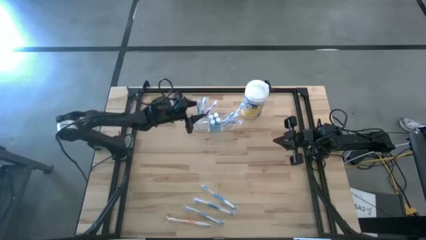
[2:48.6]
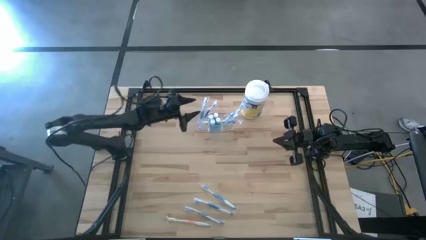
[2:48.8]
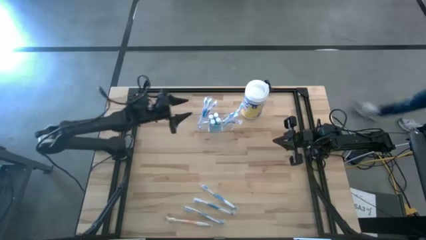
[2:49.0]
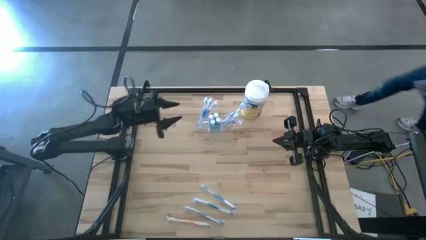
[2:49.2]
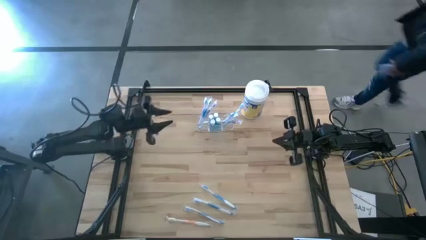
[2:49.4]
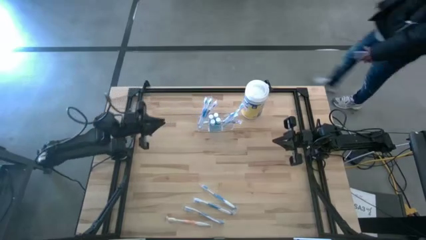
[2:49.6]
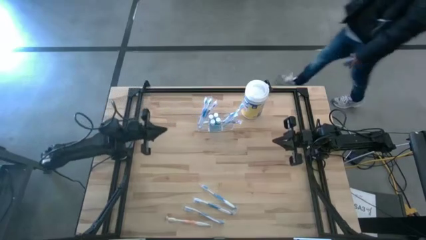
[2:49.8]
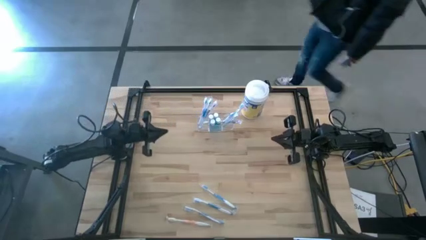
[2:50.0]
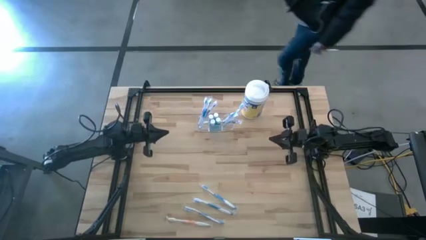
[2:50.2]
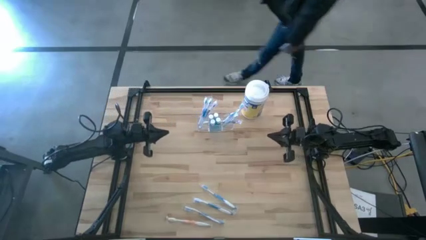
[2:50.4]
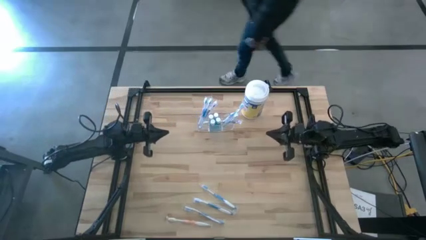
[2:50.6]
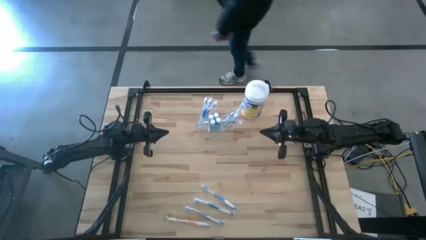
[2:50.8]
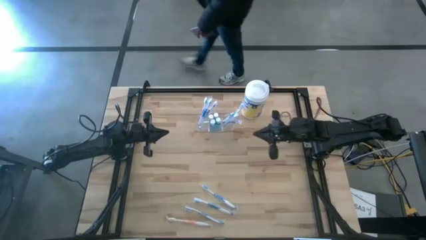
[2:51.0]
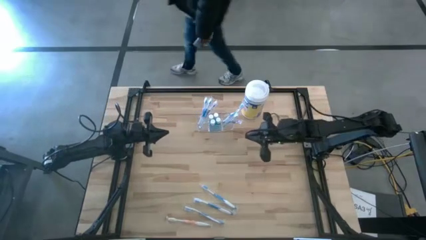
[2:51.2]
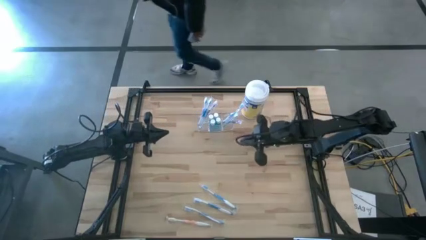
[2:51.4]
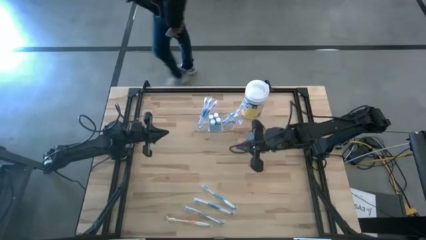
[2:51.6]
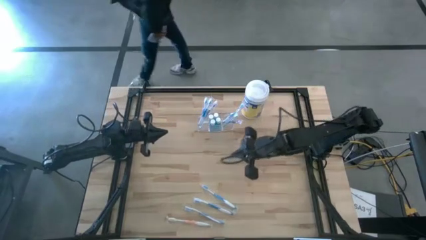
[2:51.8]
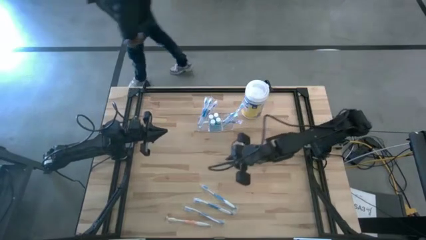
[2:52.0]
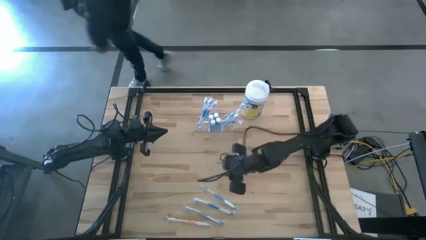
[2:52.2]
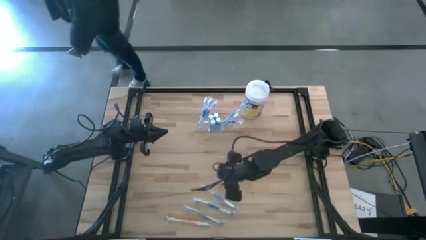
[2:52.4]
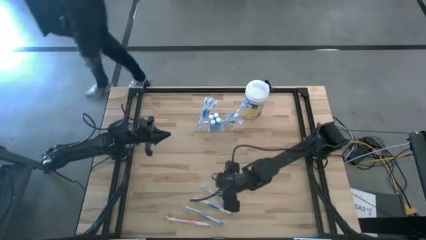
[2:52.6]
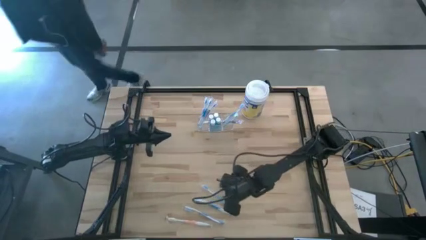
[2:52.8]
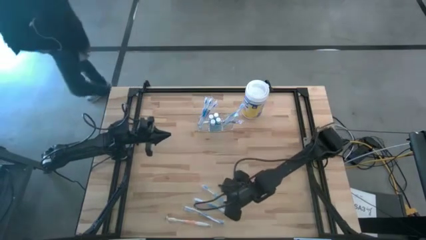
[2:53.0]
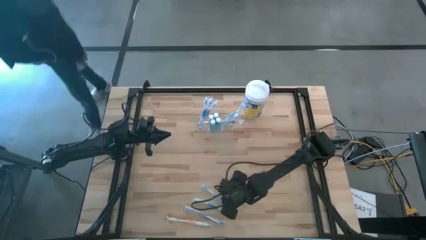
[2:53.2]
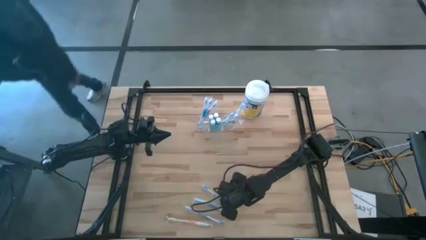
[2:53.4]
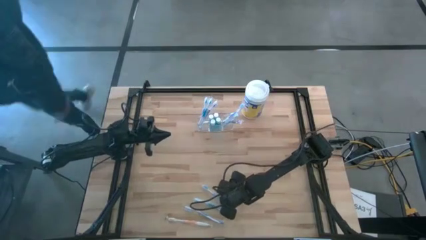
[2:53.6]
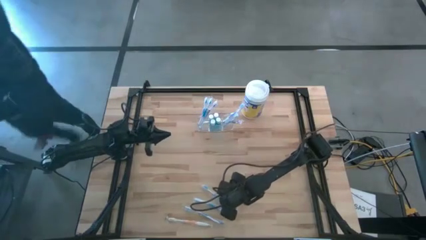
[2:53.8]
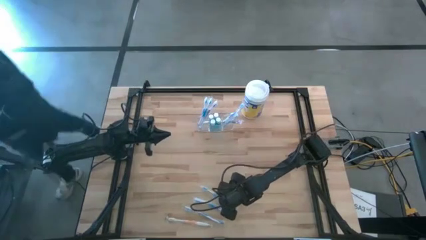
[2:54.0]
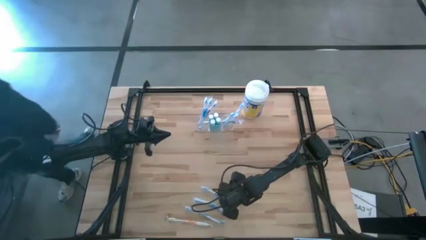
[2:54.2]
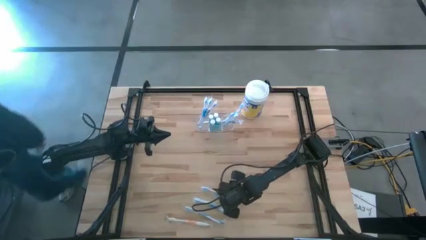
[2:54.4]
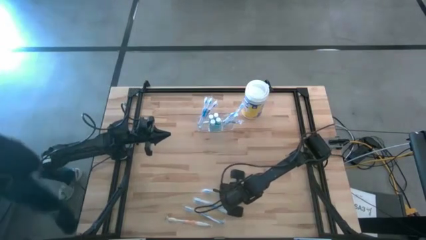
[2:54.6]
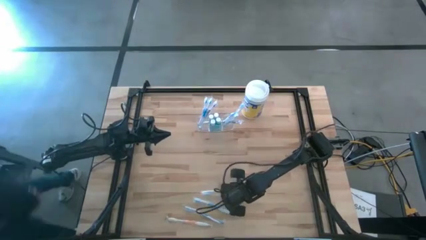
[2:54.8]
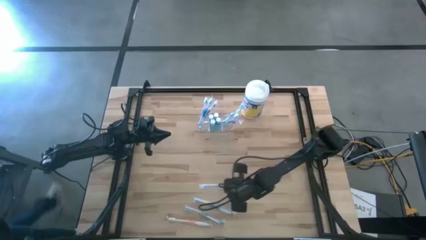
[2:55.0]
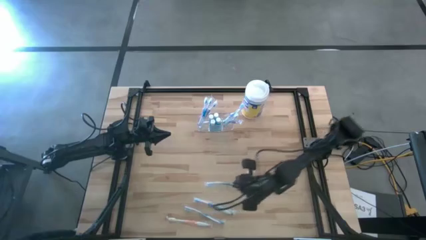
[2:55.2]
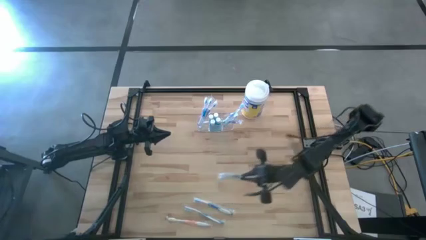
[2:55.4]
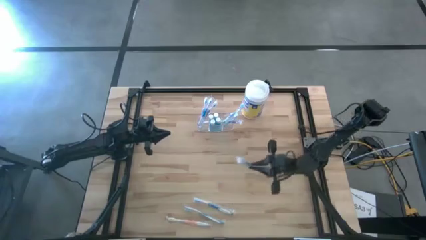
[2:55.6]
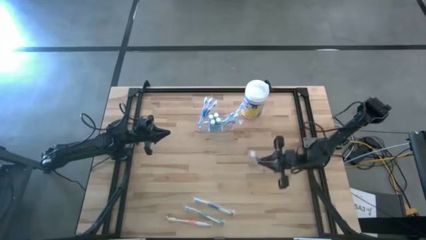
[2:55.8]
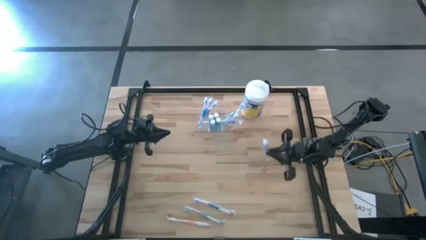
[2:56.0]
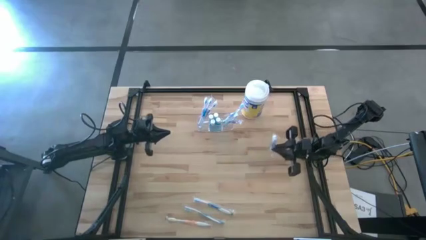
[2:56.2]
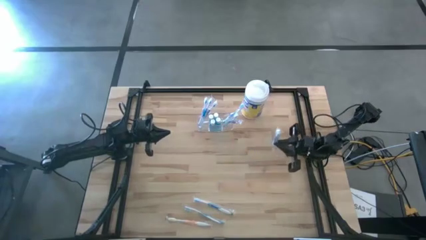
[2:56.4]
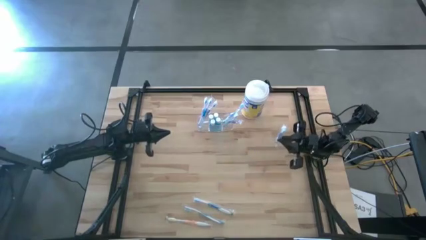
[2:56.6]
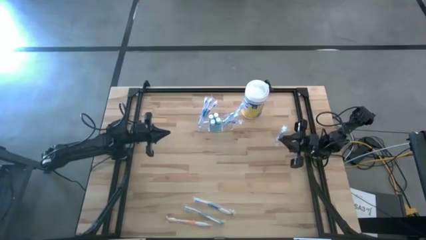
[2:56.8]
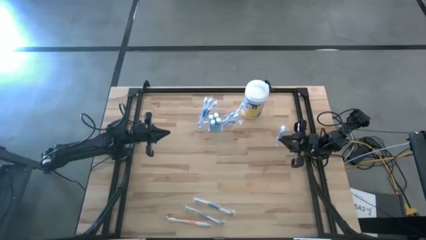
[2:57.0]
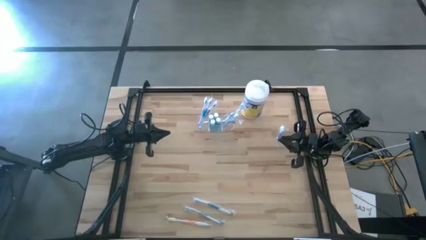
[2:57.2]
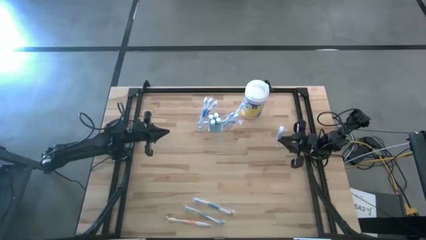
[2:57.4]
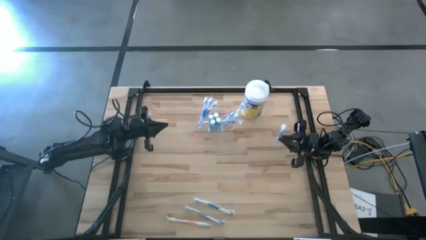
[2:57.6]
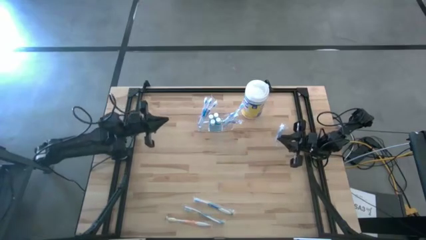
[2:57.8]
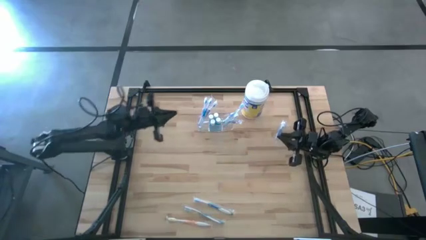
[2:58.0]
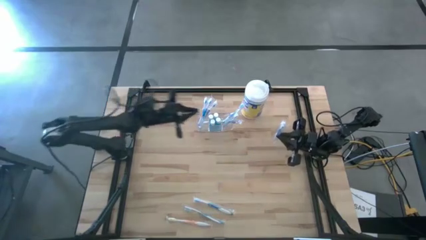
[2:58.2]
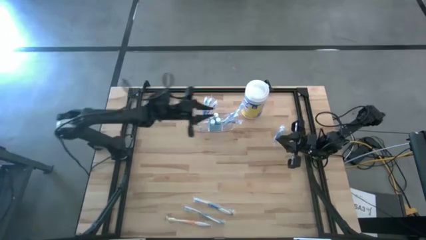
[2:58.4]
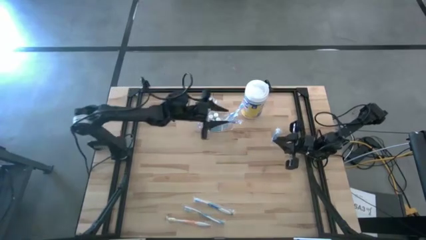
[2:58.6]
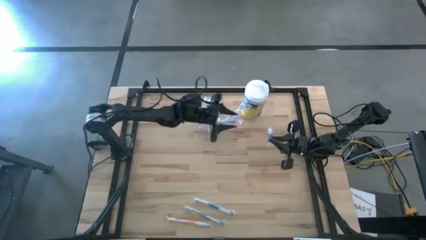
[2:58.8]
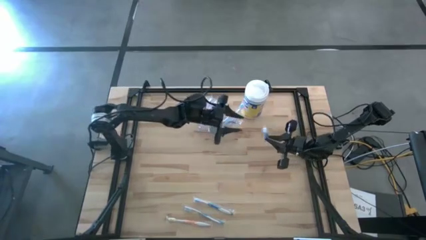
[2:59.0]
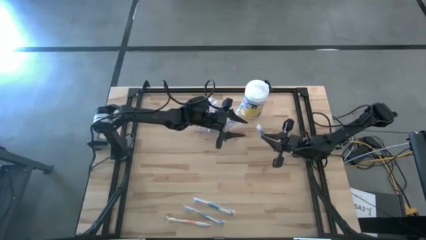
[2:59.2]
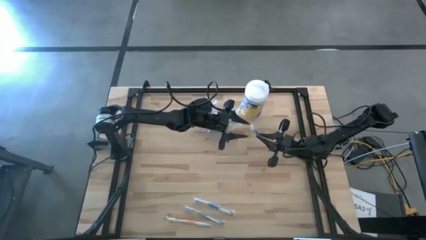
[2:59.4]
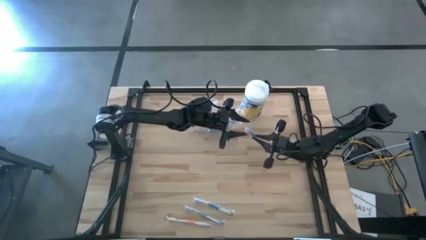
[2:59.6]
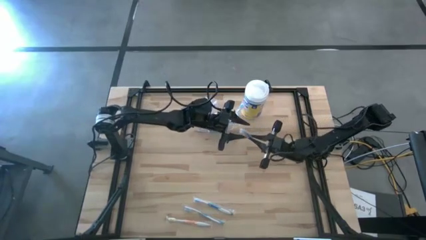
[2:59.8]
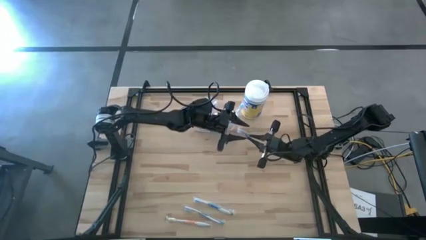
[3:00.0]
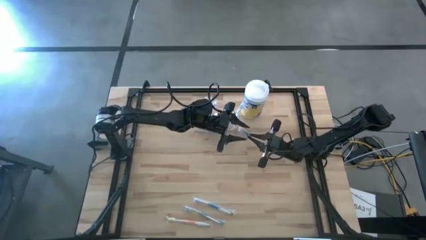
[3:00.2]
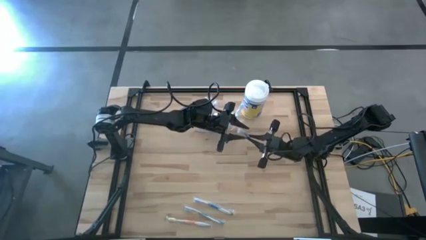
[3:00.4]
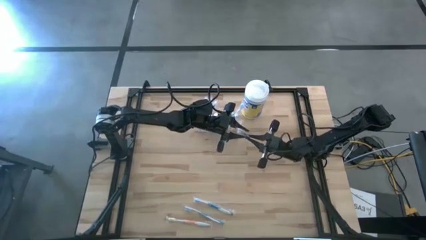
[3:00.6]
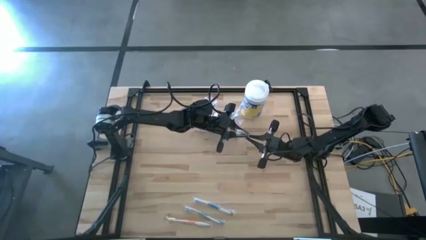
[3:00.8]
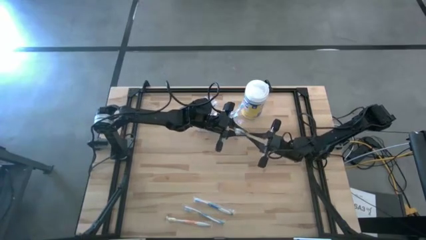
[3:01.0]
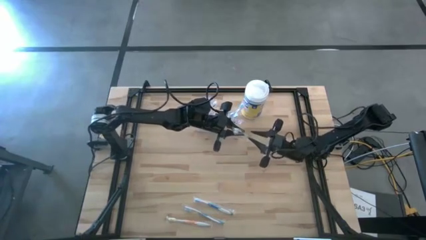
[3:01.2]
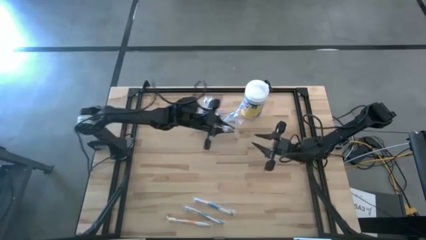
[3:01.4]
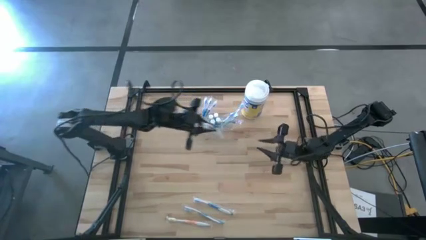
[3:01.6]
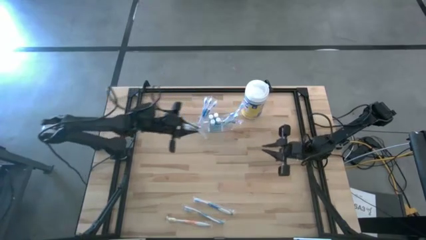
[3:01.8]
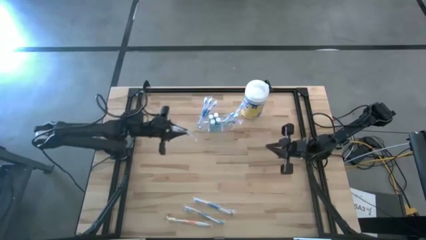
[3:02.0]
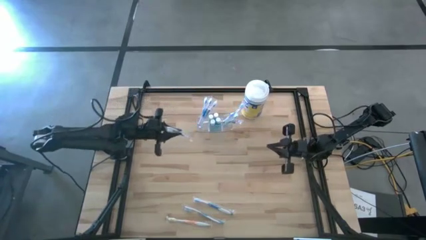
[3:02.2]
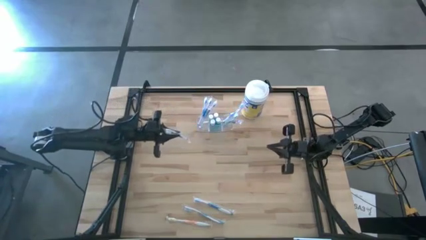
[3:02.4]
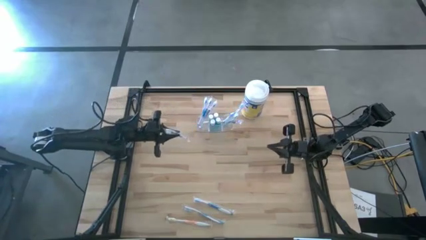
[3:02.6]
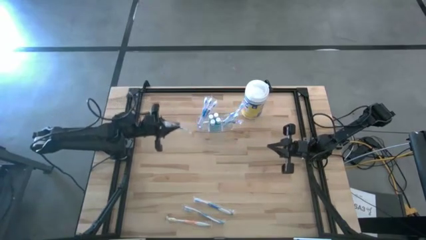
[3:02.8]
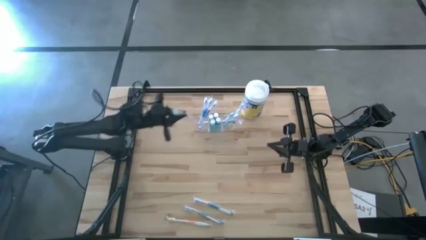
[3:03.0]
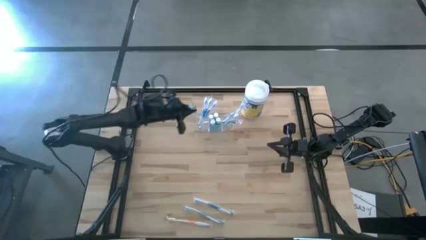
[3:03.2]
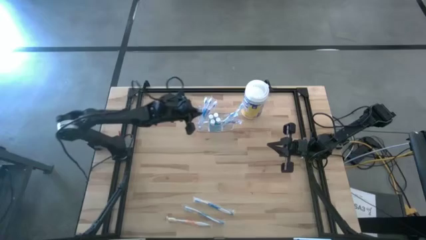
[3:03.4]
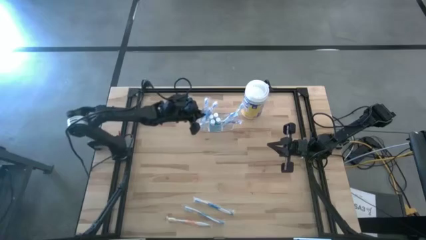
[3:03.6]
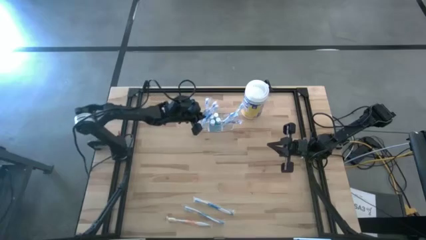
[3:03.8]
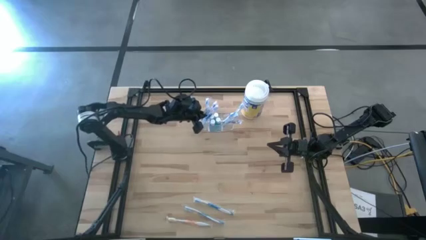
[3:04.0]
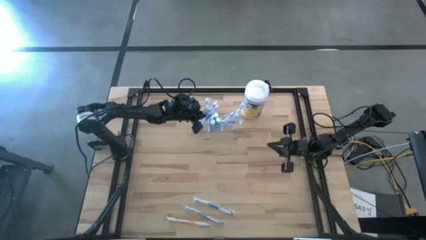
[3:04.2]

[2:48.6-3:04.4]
Task: Pick & Place toothbrushing station
Put the blue toothbrush into the left section of the transparent organizer

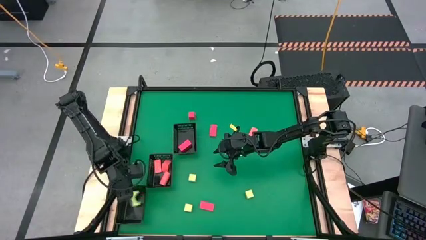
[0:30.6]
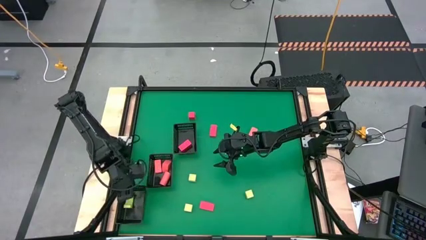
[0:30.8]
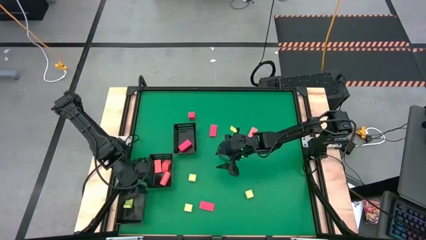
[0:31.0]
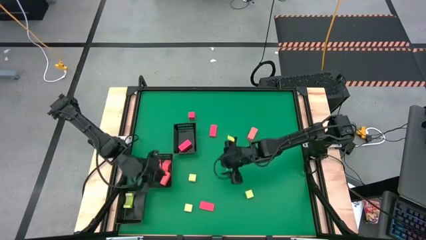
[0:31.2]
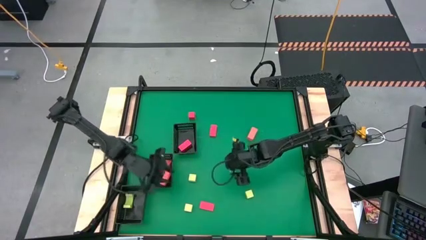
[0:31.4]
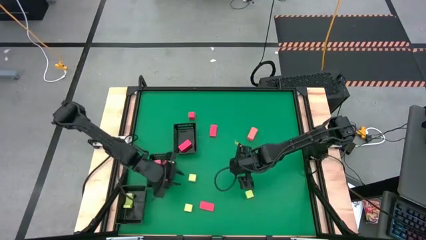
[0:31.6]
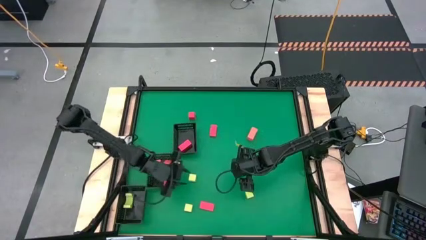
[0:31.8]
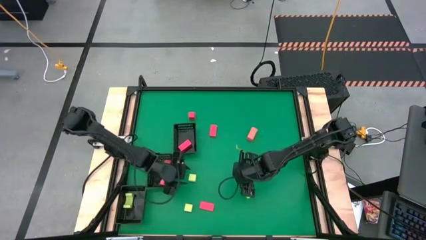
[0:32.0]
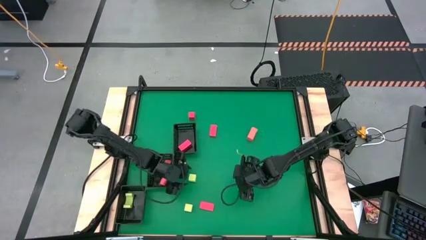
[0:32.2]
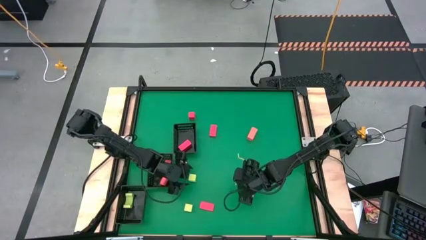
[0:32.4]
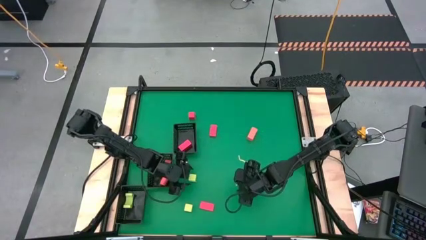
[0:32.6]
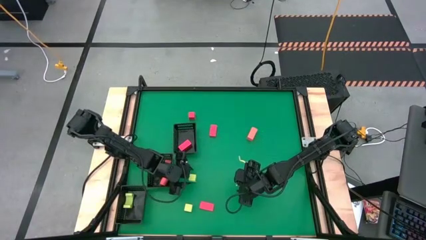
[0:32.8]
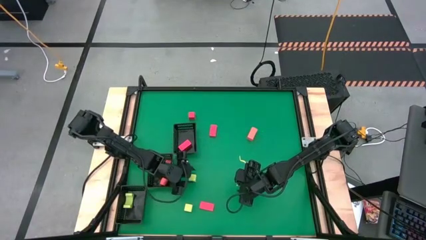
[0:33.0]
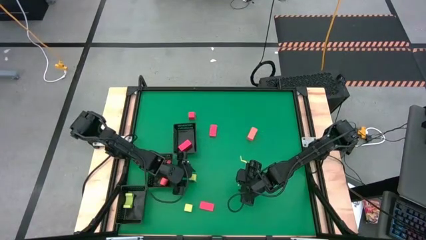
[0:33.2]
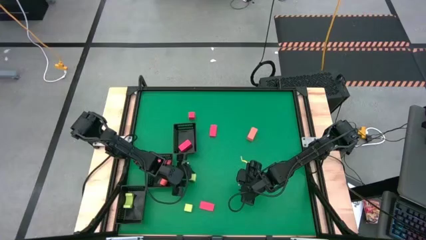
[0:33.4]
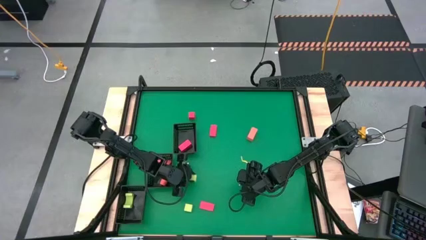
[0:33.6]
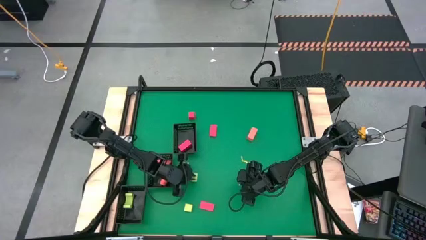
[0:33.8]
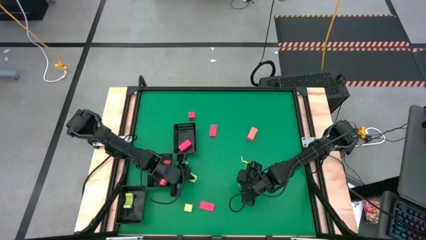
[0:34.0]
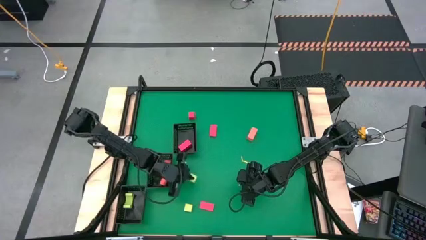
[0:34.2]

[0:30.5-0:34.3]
Task: Sort & place blocks by color
Put the green block into the bottom black bin
